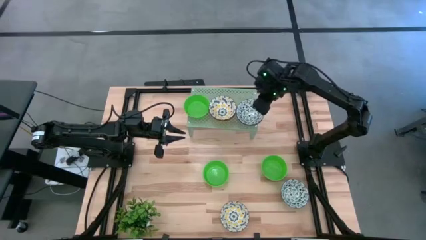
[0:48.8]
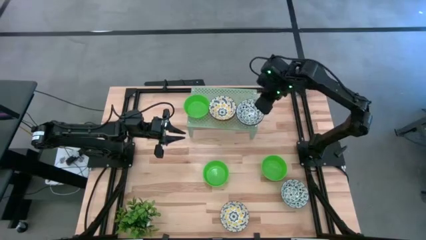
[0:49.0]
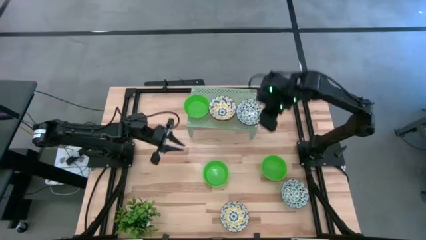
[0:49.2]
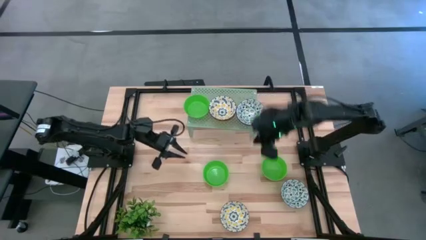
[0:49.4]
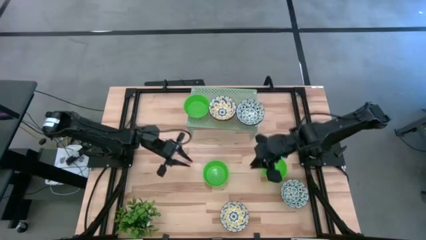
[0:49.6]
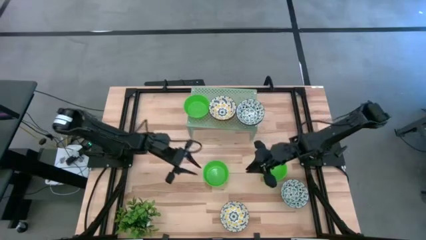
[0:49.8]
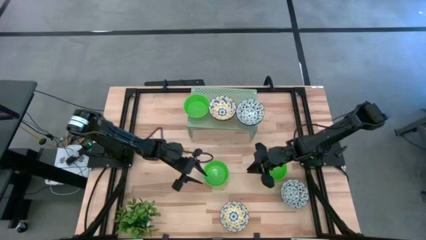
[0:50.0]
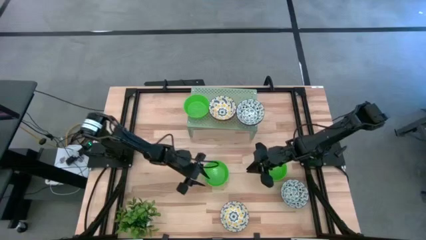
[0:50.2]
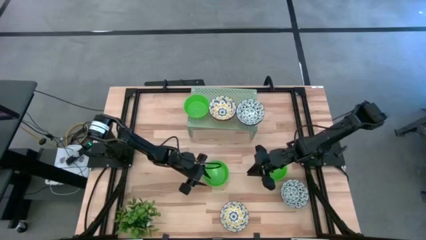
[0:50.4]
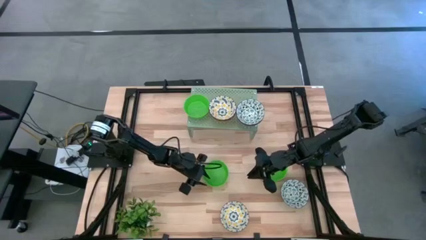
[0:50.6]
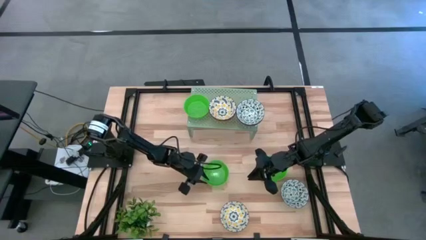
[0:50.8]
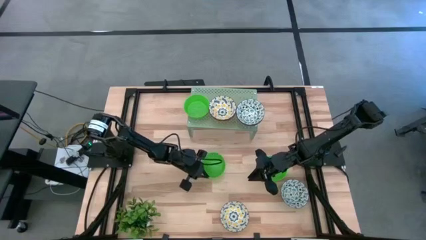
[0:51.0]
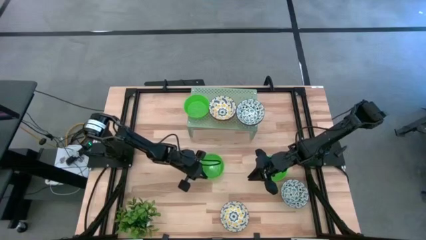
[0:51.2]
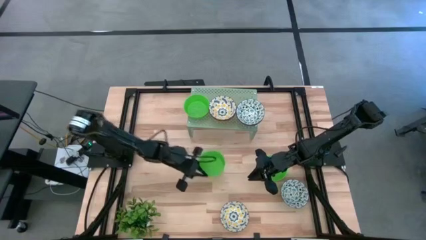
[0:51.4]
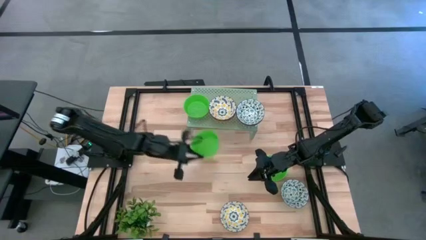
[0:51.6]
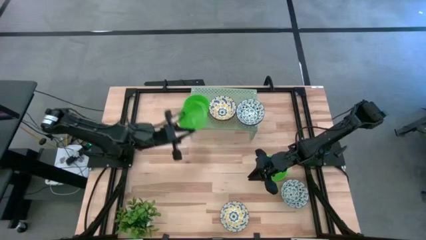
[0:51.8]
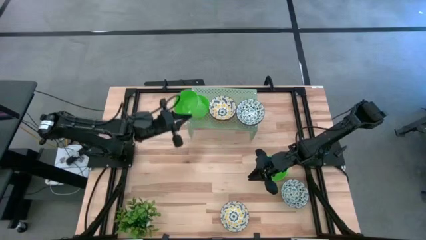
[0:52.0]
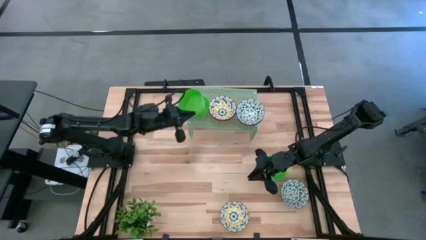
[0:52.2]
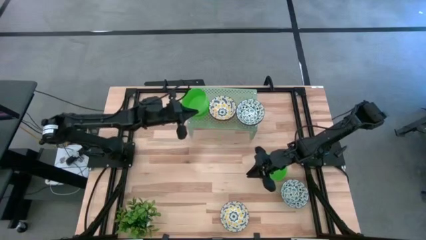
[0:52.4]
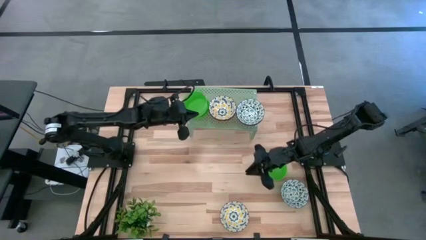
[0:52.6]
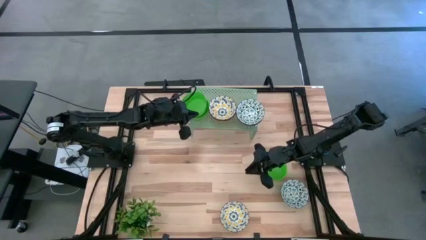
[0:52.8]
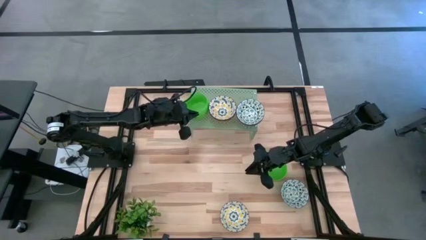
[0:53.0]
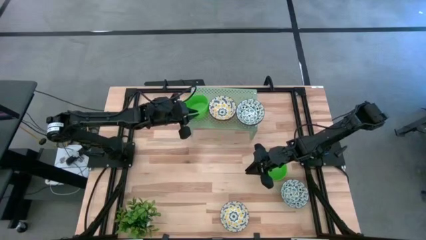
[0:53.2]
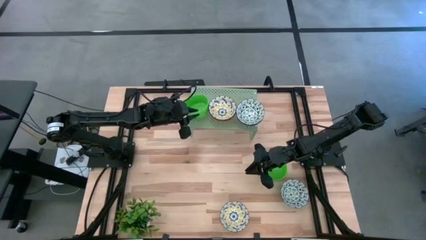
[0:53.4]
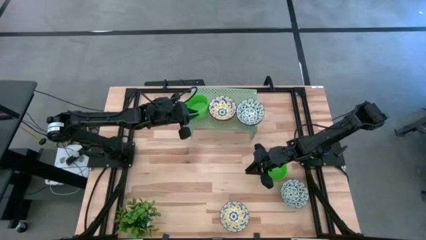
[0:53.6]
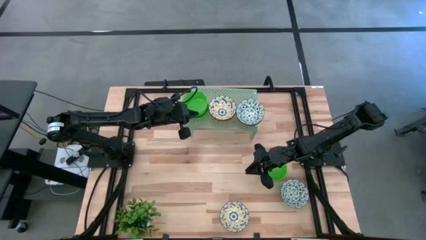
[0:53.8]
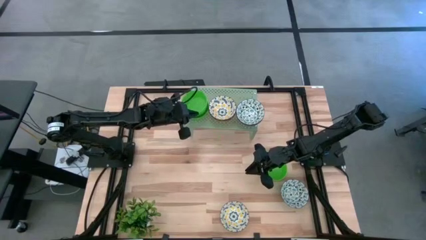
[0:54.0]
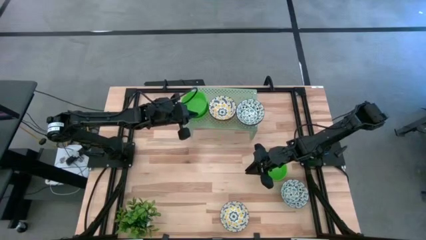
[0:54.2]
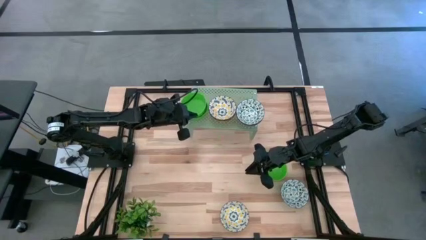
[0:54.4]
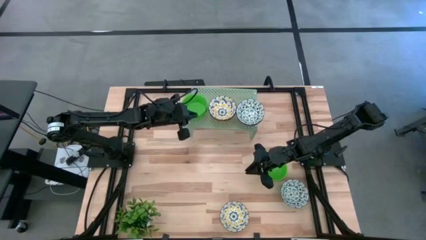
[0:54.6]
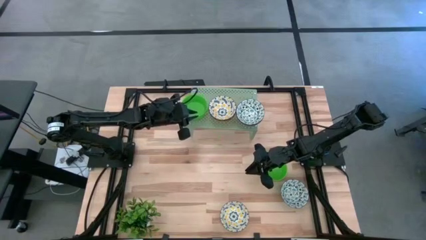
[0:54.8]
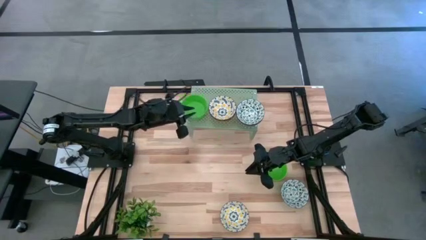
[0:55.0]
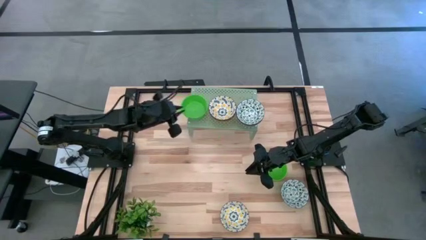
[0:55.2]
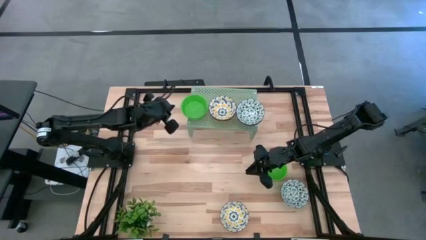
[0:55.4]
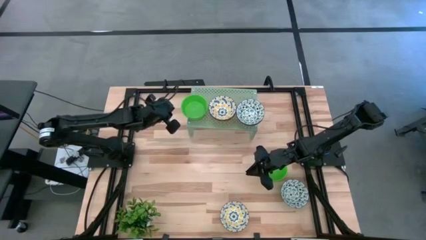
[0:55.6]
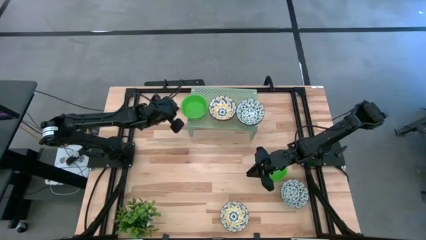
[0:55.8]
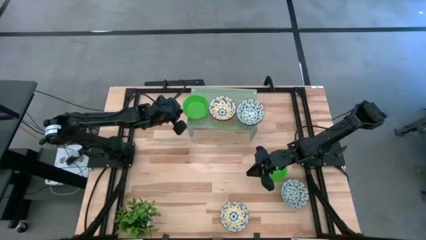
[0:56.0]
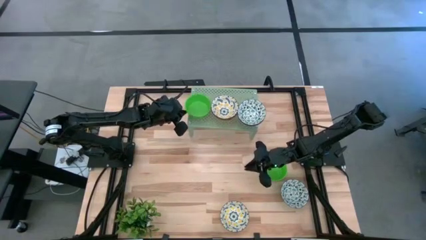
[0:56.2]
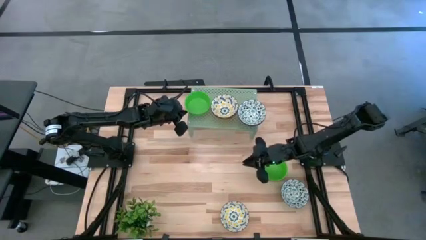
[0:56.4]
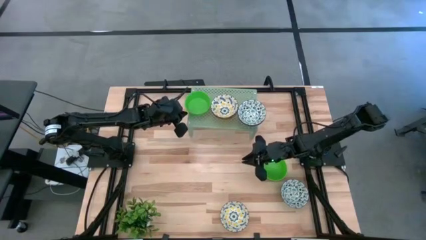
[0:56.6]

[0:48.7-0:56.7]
Task: Pick & Place Mini bowls
Stack the left green bowl on the green bowl on the shelf

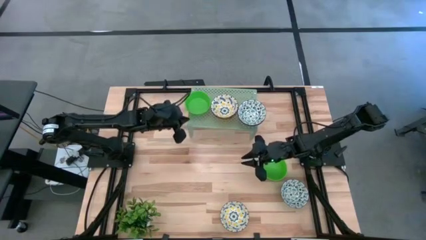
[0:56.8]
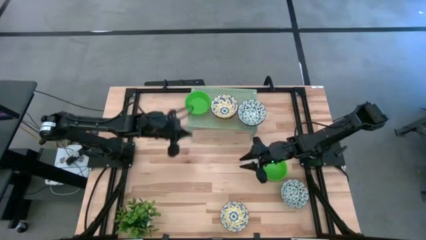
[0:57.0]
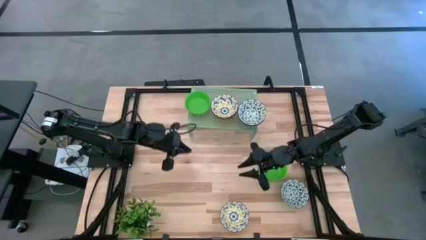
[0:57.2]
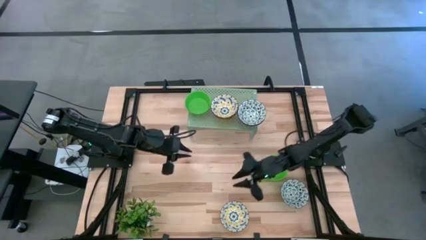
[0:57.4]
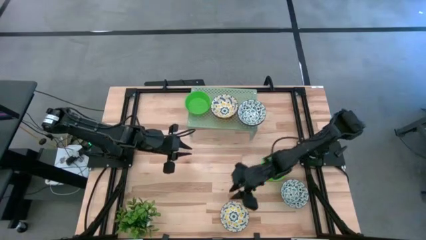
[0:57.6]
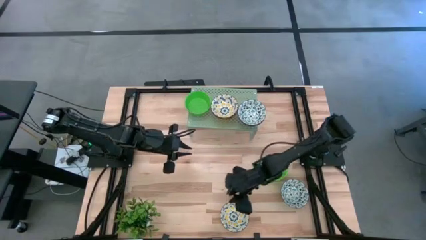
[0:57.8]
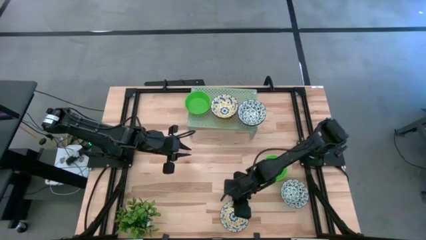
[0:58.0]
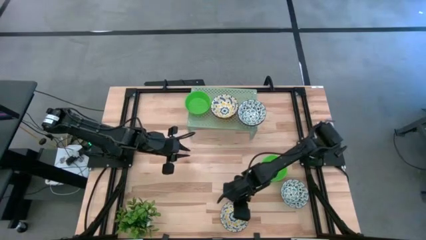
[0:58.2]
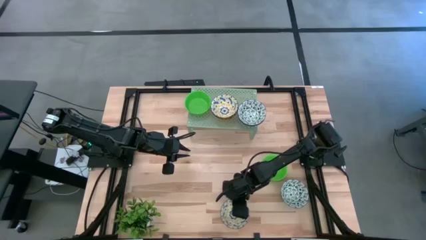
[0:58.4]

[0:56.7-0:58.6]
Stack the yellow bowl on the yellow bowl on the shelf

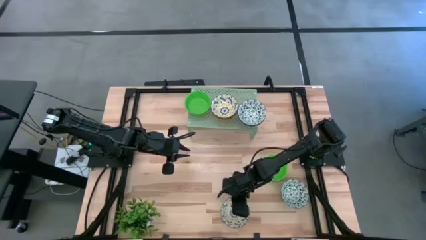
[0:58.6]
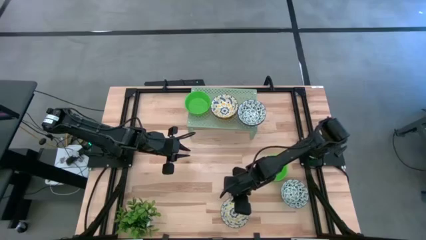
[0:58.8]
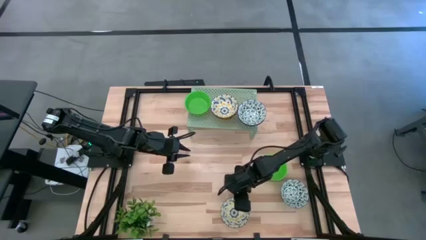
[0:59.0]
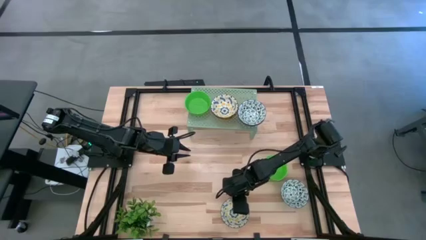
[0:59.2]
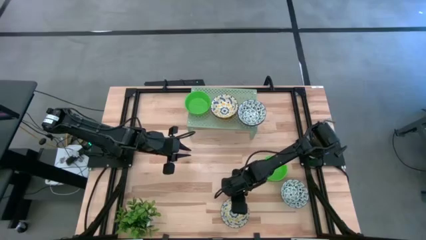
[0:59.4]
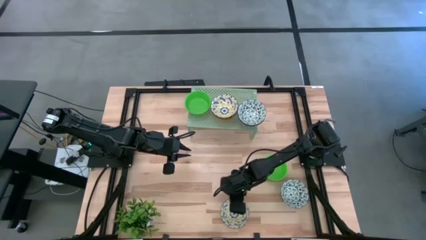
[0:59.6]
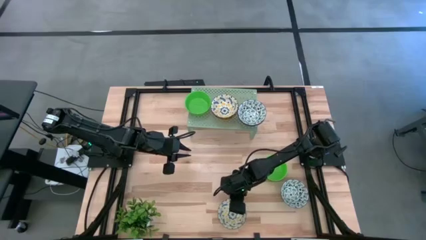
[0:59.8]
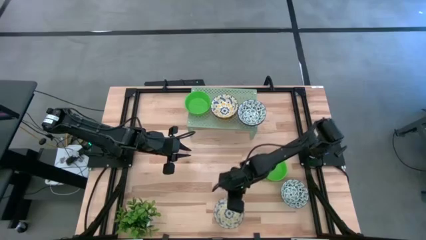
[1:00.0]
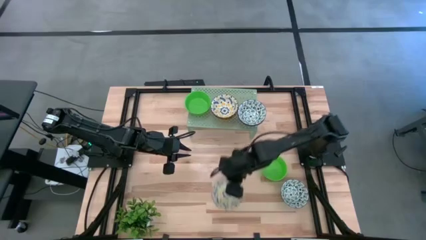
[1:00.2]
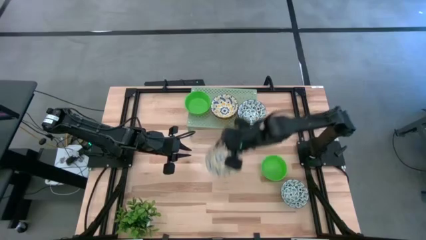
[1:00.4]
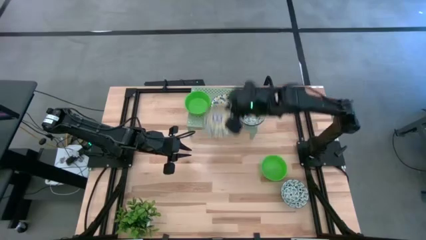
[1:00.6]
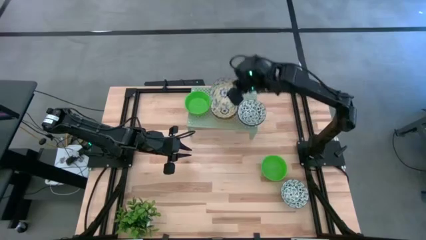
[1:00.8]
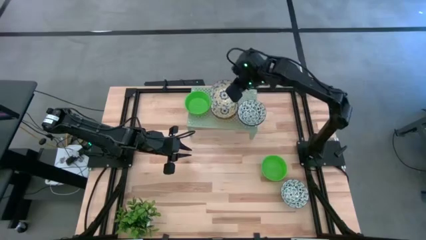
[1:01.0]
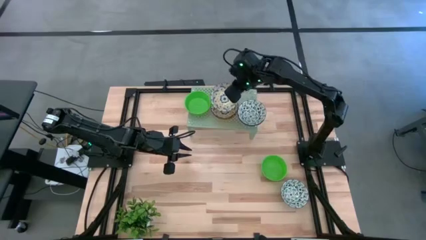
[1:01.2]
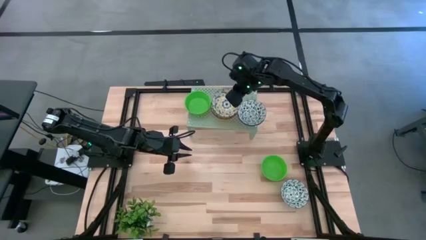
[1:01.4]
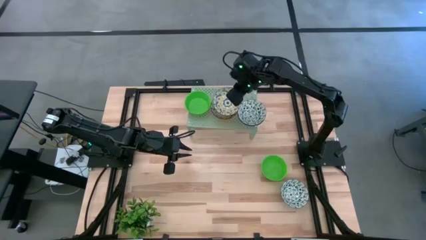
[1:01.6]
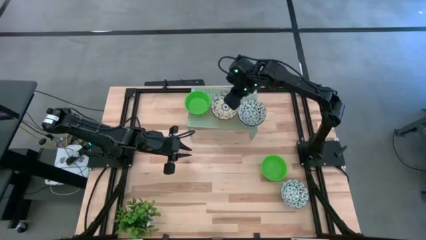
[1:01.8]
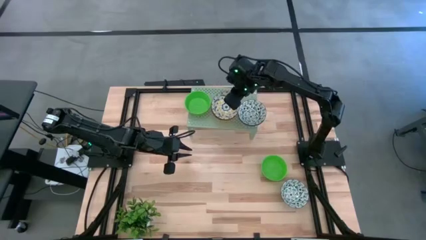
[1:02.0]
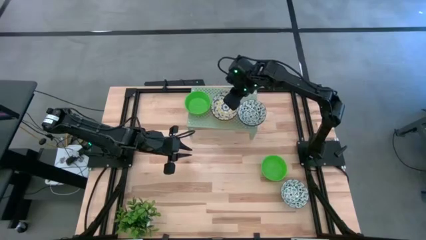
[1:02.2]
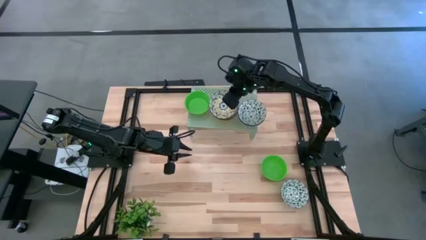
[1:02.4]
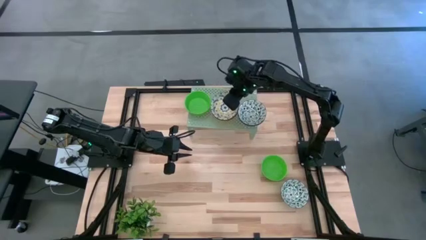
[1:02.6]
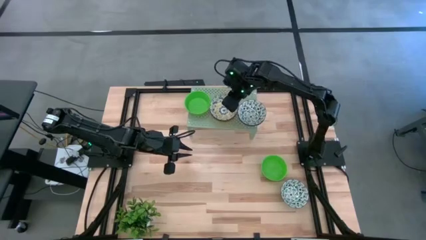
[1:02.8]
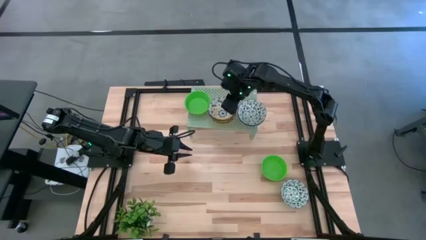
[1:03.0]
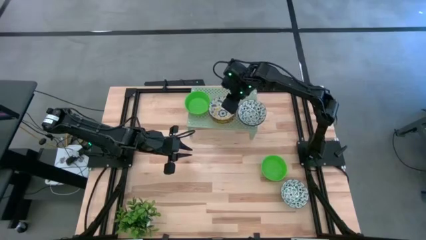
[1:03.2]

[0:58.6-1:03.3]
Stack the yellow bowl on the yellow bowl on the shelf

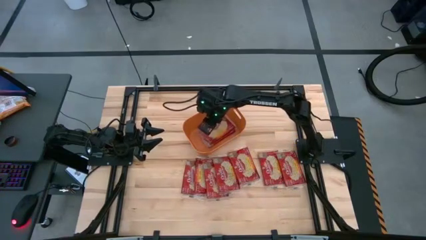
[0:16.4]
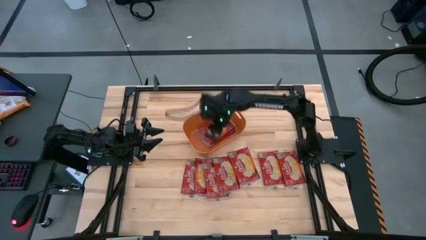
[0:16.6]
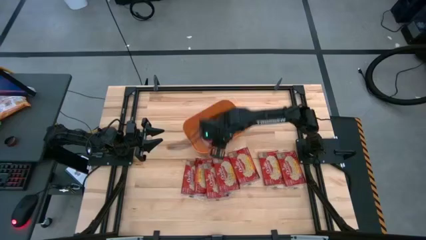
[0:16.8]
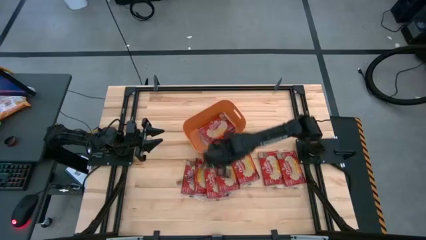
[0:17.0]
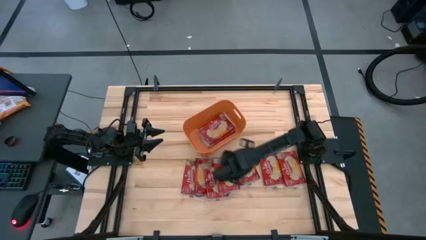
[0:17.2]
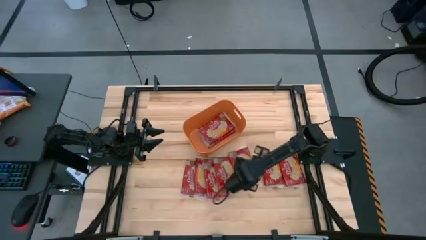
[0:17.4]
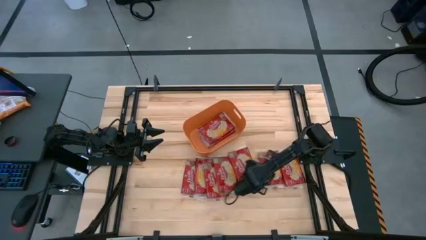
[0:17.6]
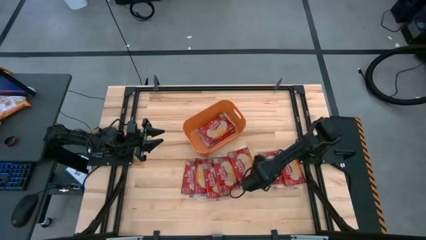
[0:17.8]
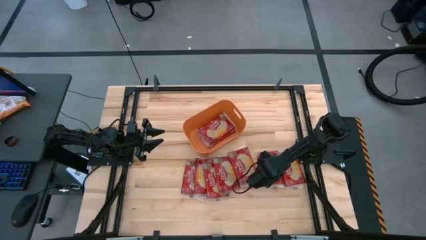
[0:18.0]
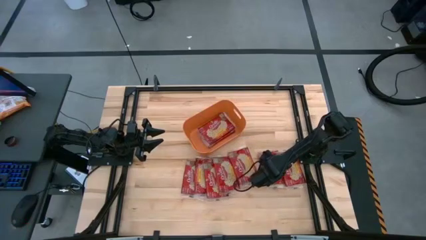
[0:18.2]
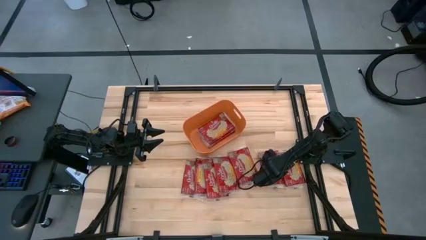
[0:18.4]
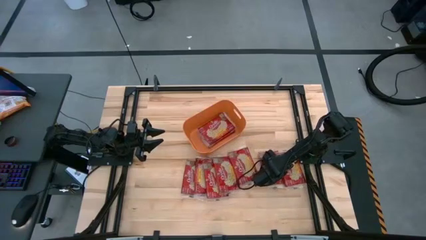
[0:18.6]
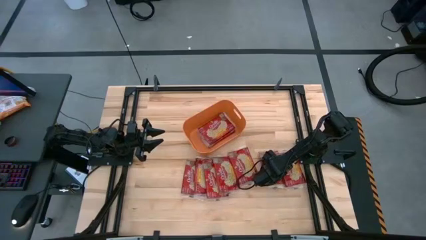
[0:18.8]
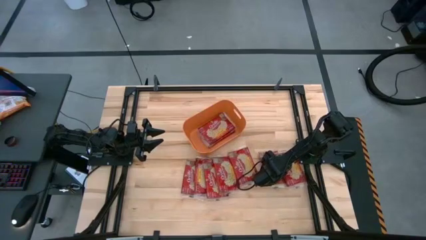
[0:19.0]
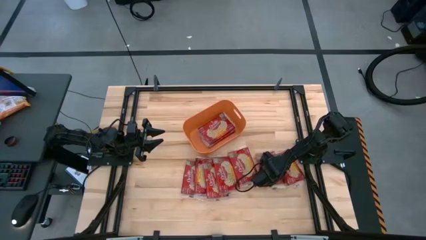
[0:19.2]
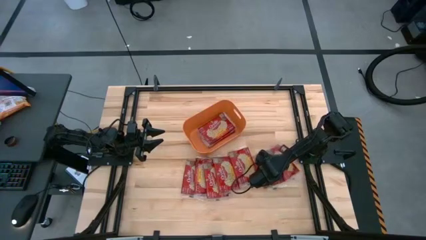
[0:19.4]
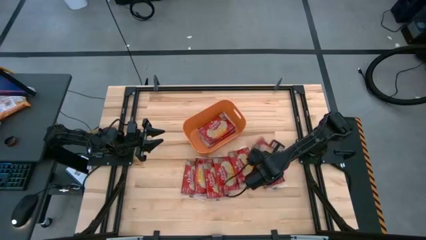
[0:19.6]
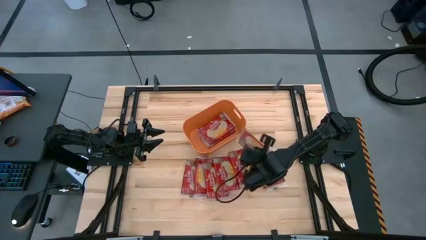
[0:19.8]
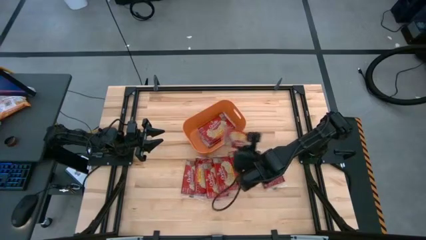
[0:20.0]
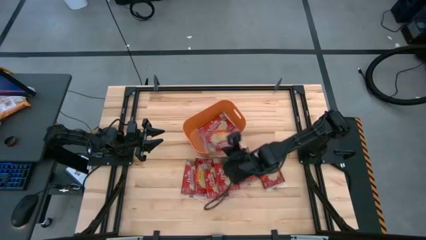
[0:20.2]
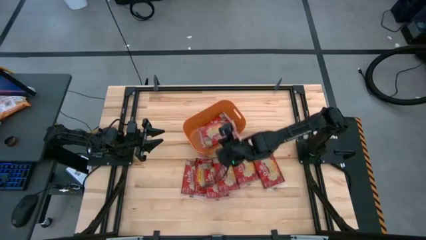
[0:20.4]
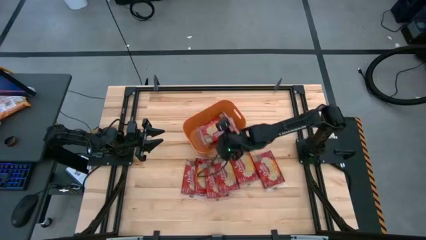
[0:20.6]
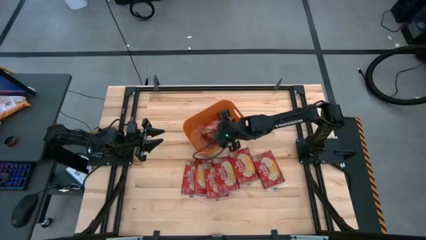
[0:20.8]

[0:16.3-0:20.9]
Task: Sort popcorn bags into baskets
Put the pop corn bag into the orange bin
